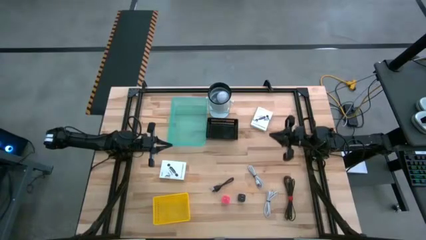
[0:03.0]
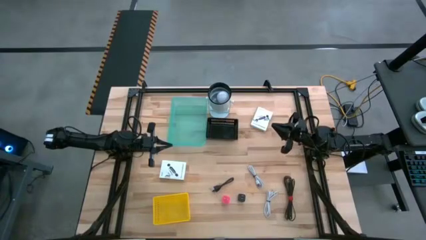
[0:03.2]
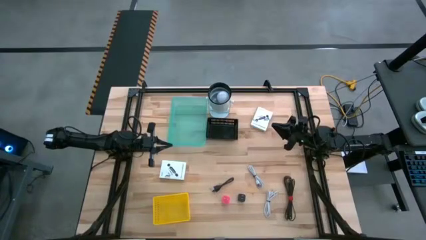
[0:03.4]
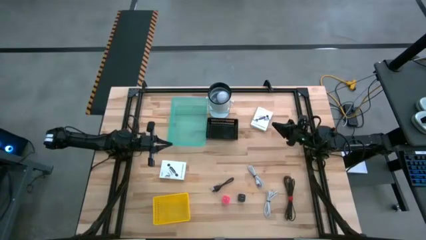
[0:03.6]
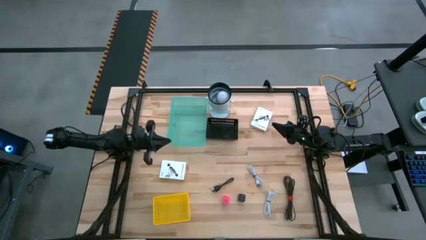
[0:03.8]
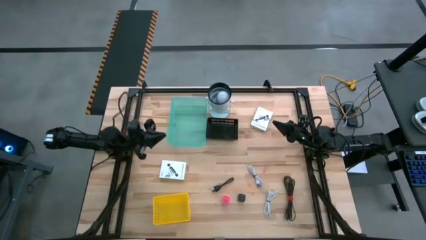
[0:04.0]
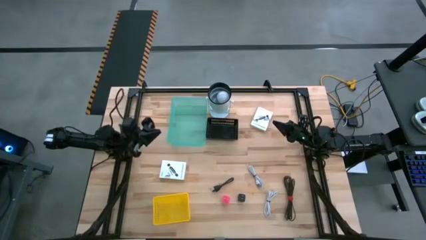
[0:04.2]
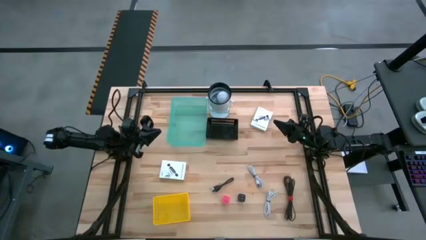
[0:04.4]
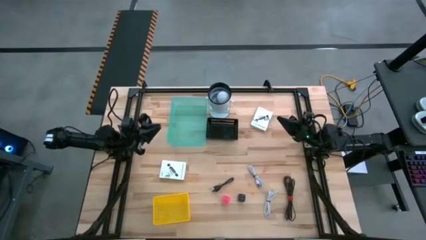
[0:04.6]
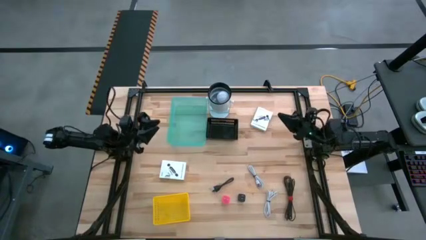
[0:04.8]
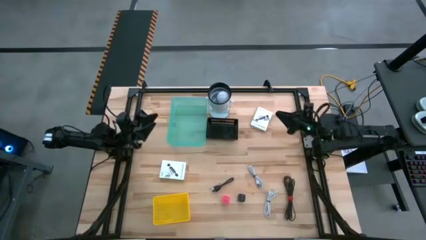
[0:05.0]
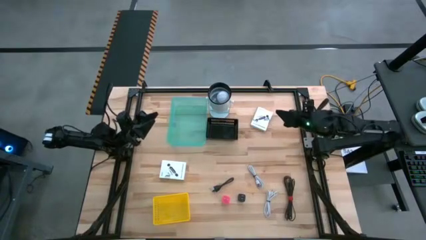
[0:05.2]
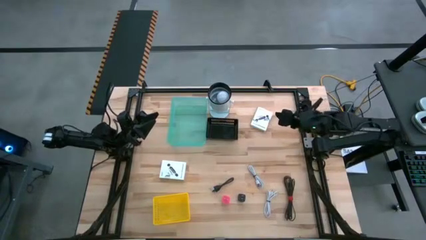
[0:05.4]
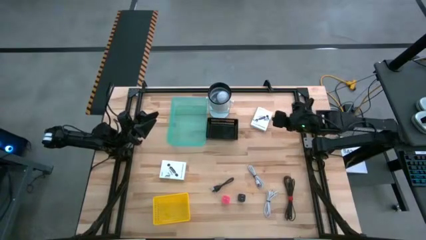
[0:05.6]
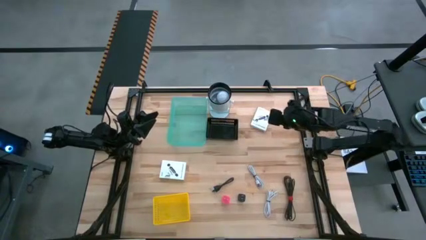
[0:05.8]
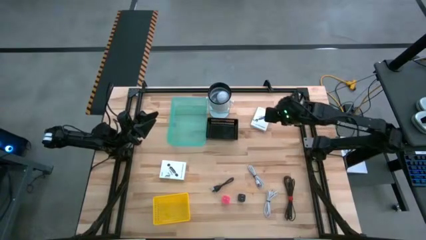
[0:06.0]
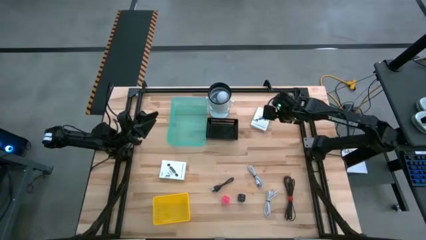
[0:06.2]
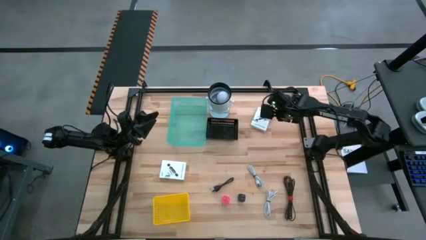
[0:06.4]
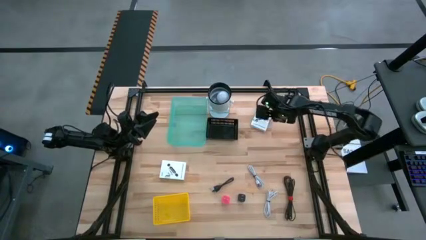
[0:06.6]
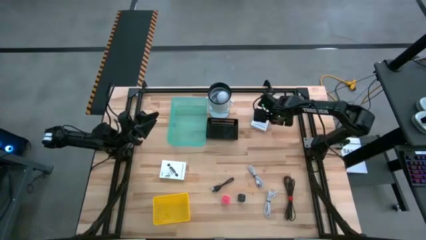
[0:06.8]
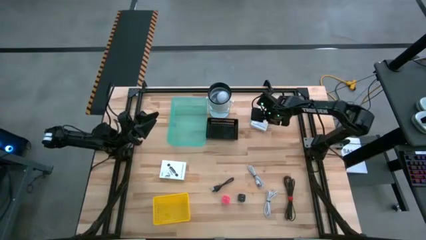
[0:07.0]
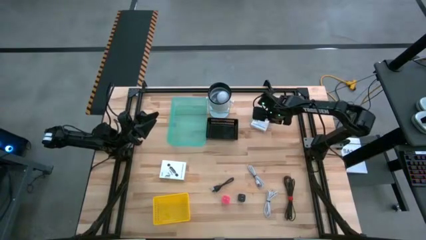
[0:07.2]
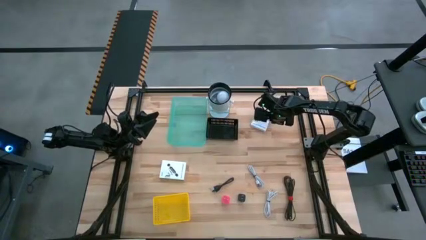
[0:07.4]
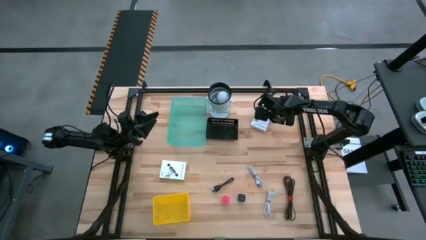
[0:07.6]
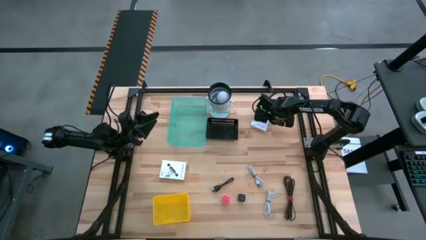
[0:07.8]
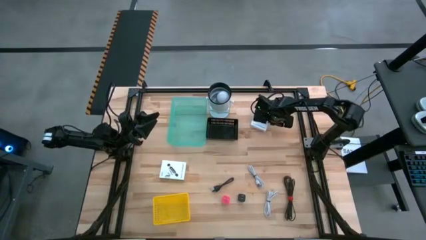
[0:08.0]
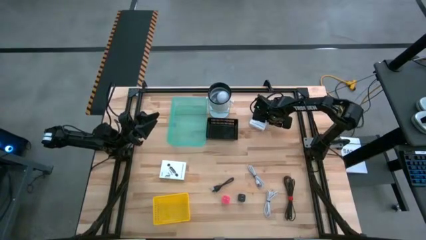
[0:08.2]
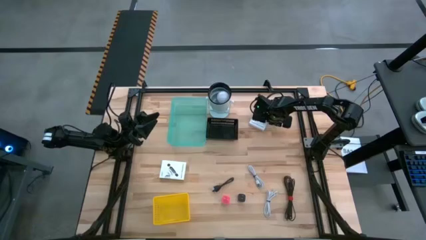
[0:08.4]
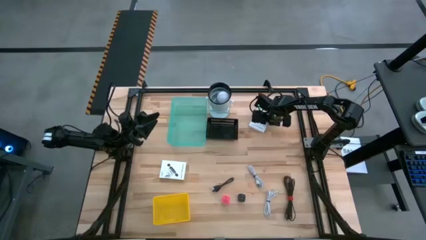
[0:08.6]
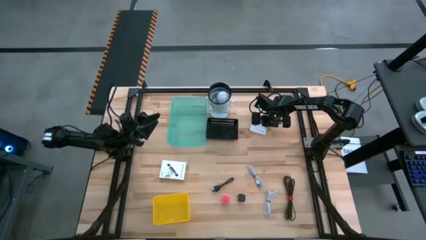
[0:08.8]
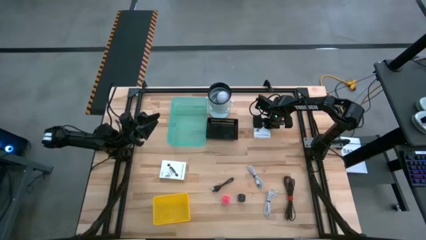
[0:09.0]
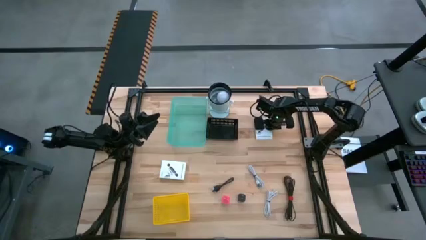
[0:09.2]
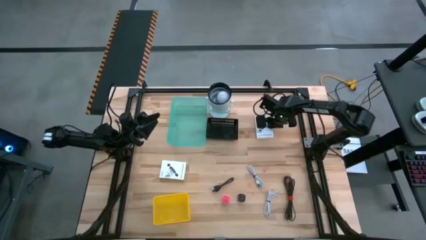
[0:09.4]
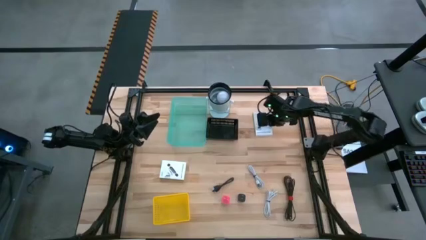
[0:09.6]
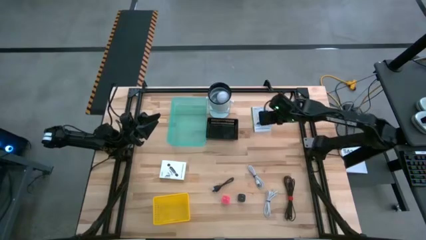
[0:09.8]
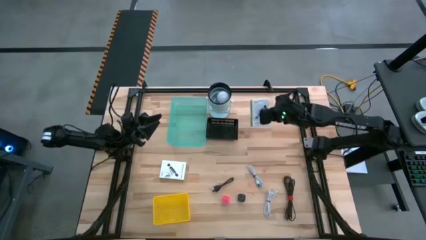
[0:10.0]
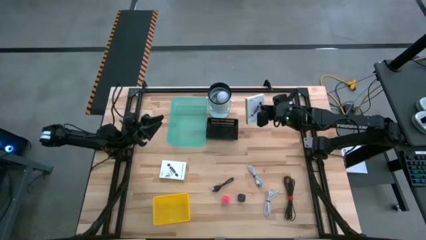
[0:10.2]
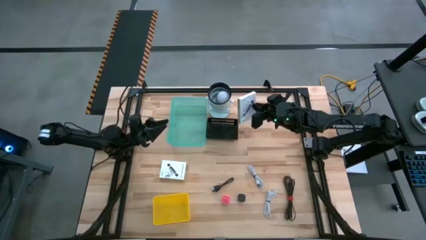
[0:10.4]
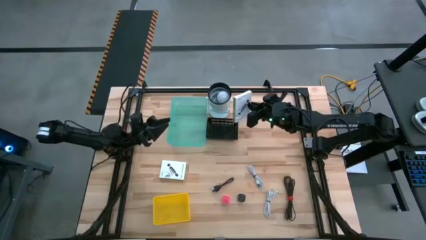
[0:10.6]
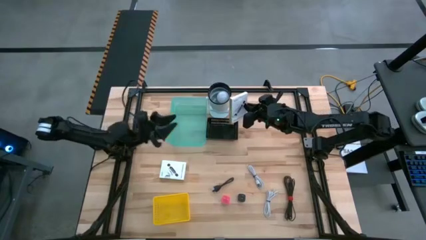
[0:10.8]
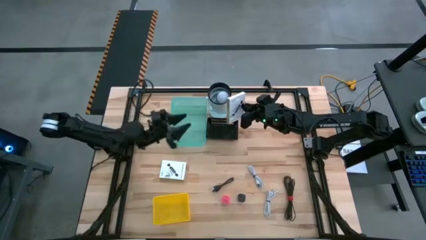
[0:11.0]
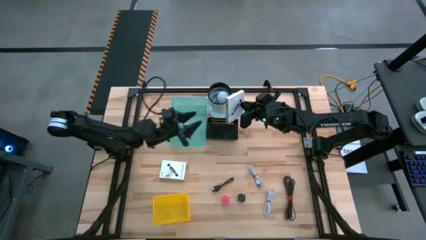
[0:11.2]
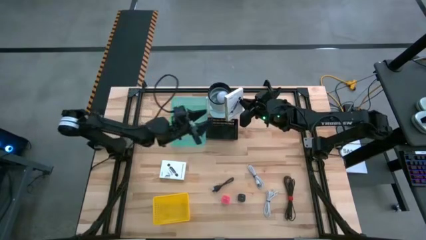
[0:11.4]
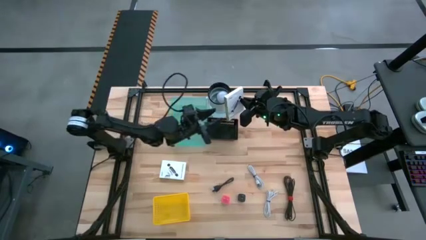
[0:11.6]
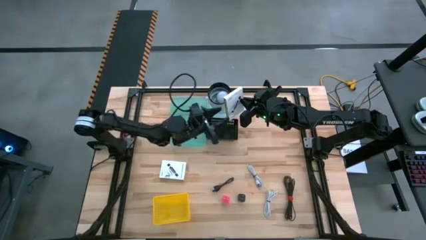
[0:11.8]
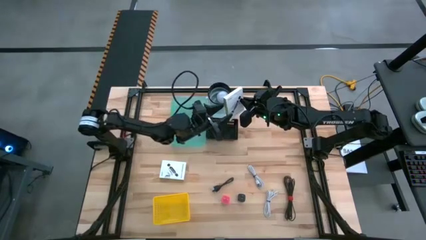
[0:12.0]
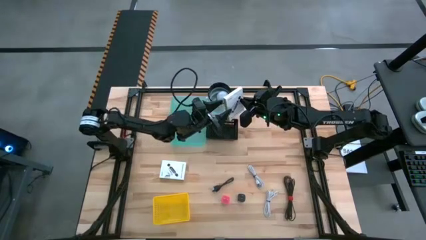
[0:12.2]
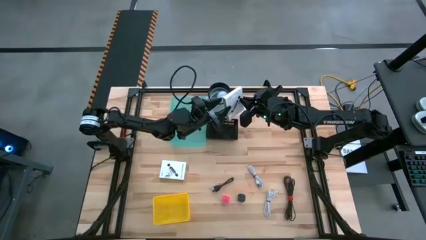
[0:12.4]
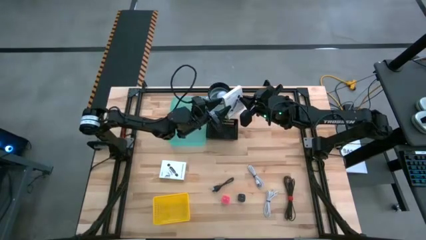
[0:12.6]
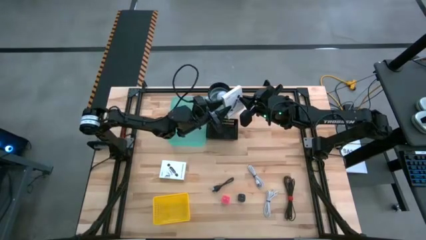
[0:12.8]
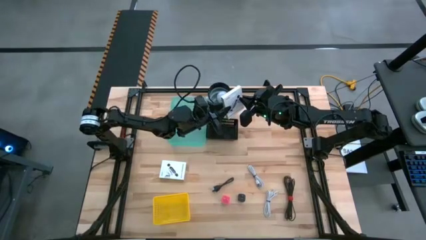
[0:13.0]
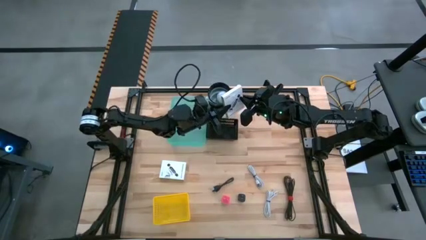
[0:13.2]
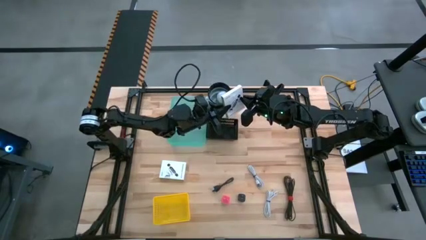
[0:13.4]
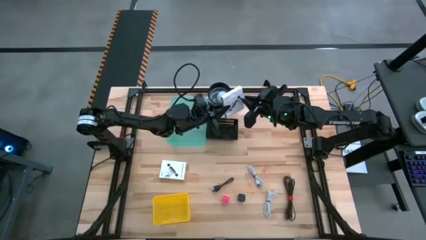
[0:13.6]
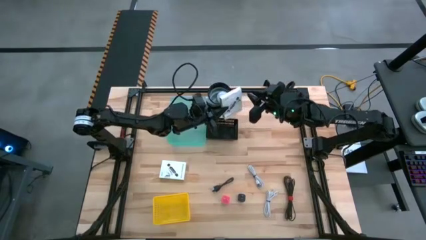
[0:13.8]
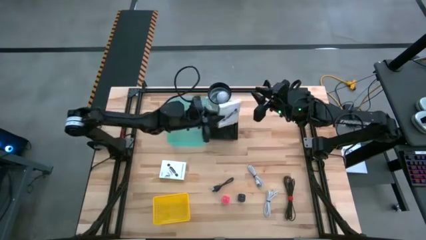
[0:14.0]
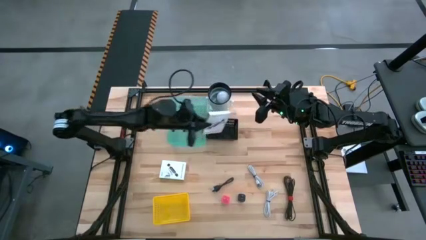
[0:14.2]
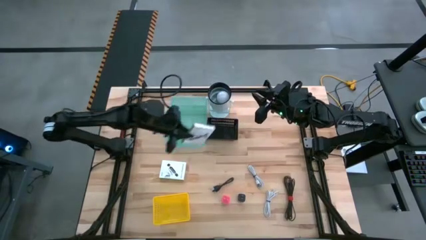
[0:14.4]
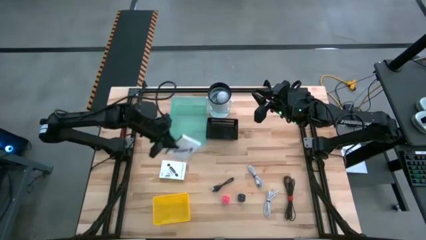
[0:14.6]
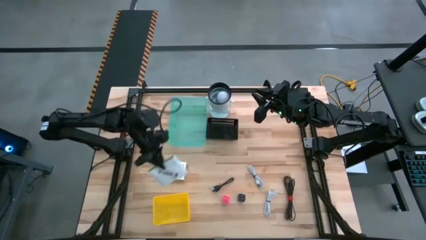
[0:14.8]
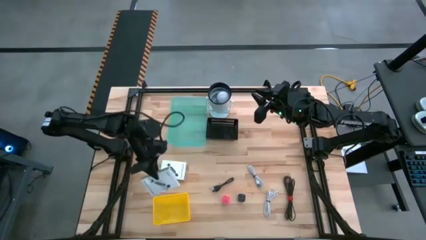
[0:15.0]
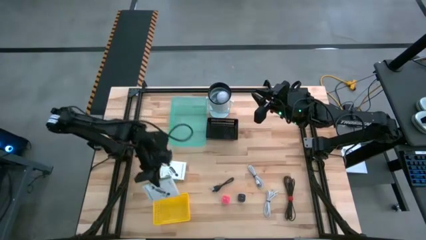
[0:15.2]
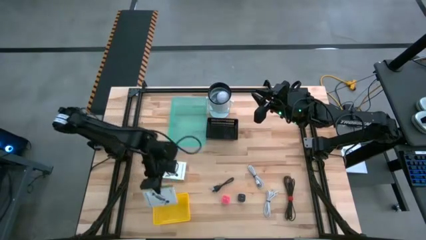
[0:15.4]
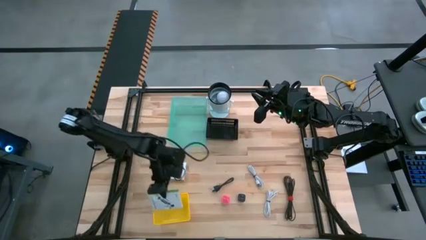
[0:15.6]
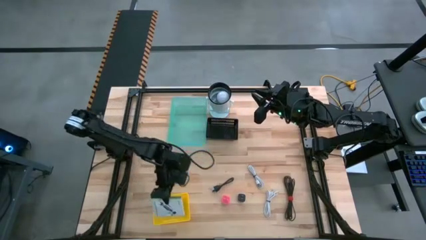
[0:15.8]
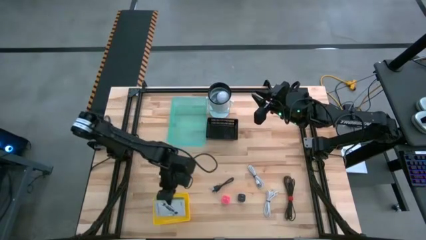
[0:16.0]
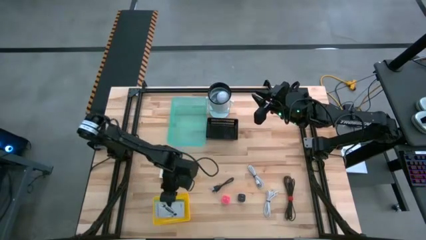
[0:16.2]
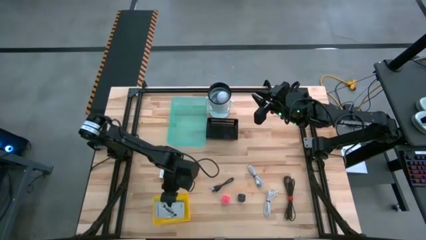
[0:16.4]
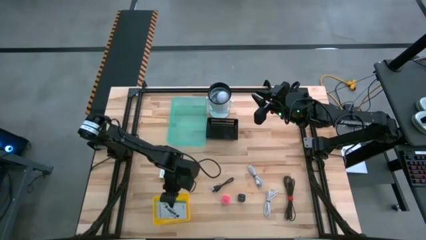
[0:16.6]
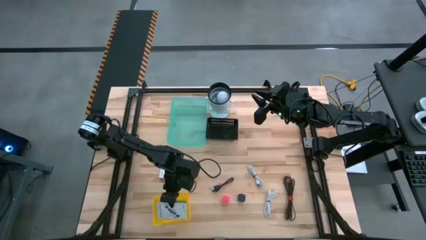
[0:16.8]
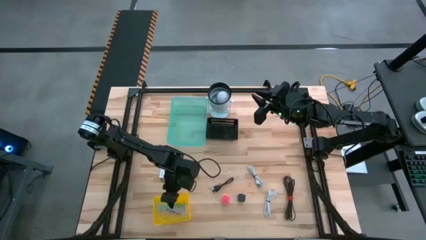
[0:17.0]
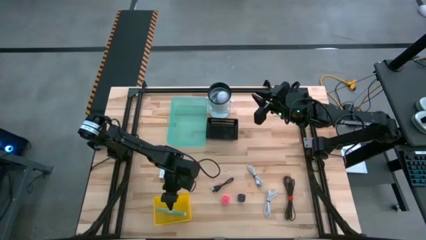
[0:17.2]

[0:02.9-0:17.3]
Task: Pick and place items into bin
Put the top white card reader box into the yellow bin
